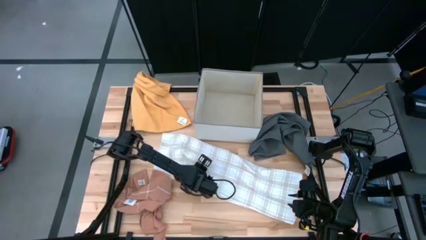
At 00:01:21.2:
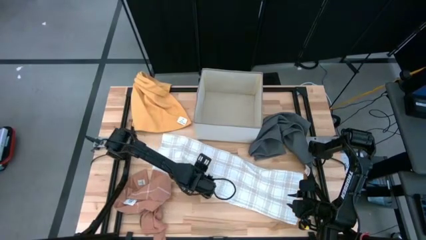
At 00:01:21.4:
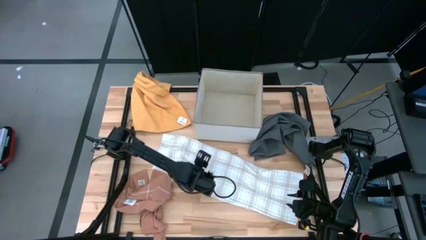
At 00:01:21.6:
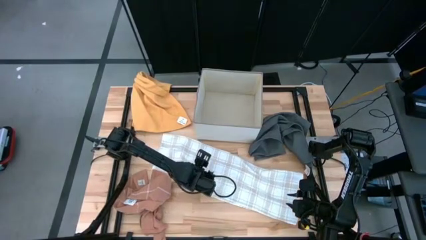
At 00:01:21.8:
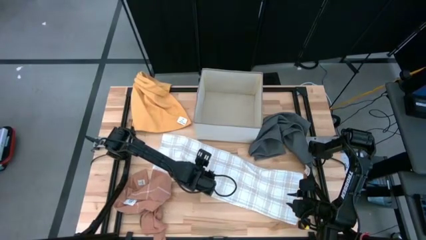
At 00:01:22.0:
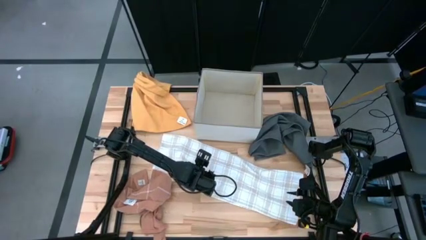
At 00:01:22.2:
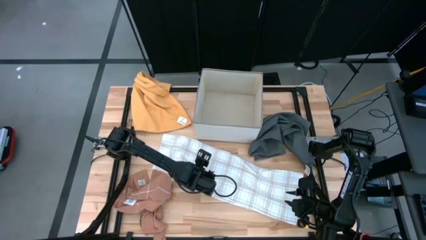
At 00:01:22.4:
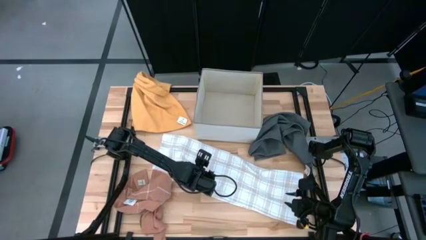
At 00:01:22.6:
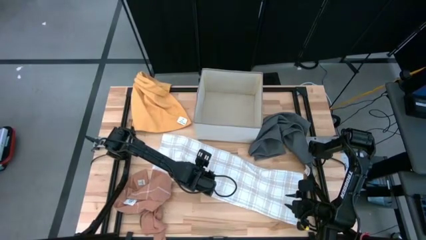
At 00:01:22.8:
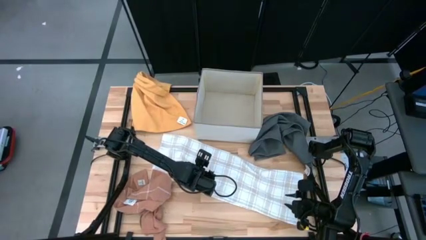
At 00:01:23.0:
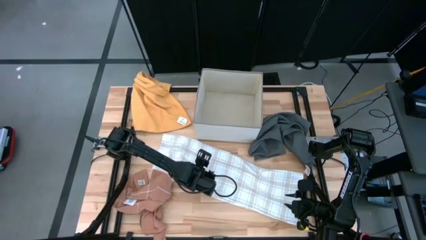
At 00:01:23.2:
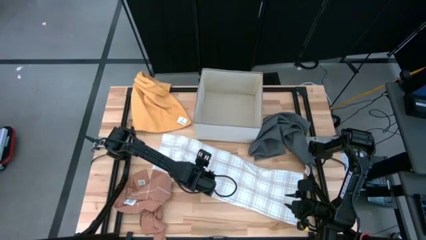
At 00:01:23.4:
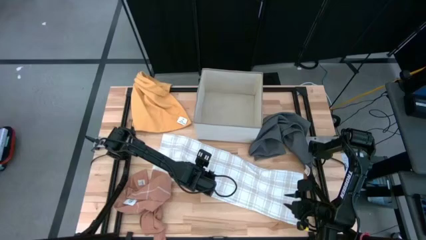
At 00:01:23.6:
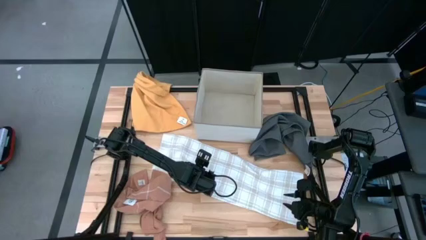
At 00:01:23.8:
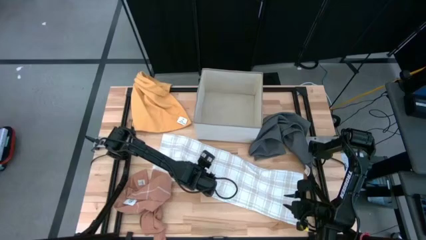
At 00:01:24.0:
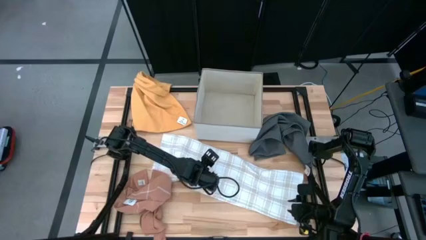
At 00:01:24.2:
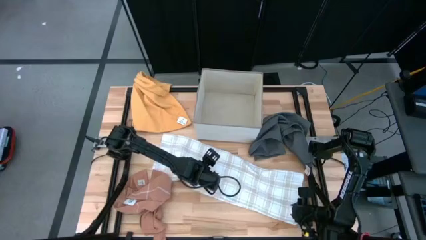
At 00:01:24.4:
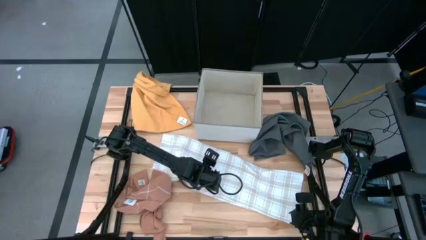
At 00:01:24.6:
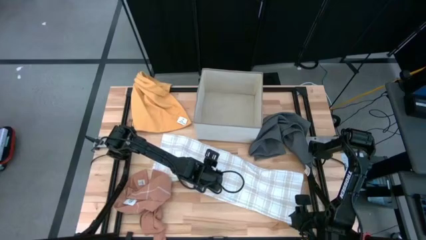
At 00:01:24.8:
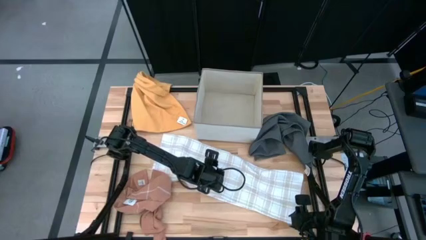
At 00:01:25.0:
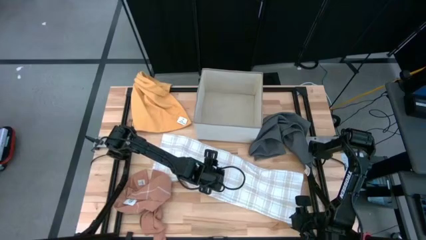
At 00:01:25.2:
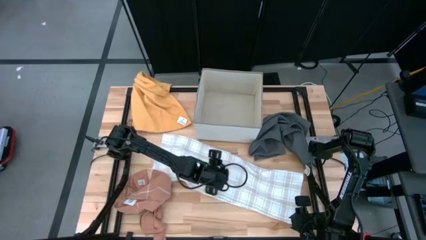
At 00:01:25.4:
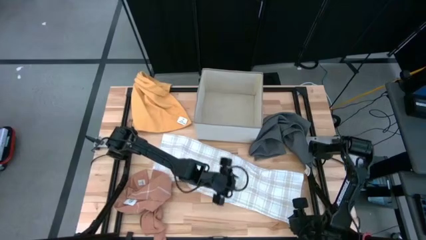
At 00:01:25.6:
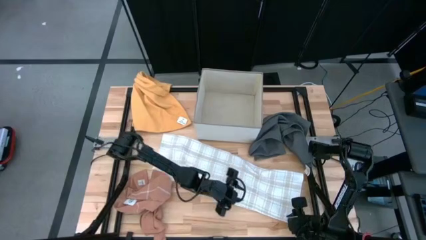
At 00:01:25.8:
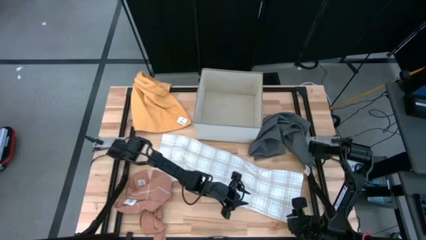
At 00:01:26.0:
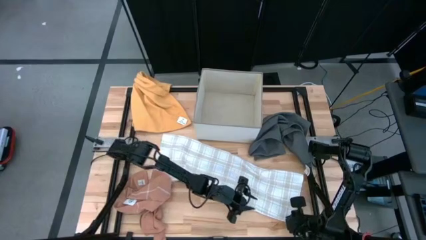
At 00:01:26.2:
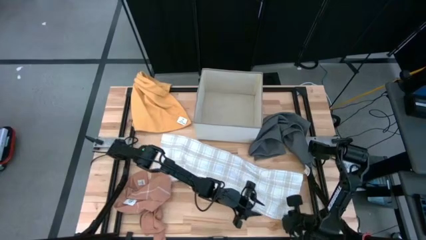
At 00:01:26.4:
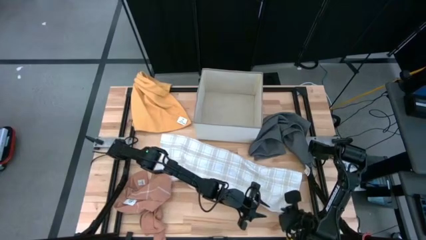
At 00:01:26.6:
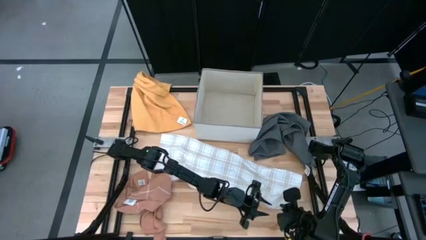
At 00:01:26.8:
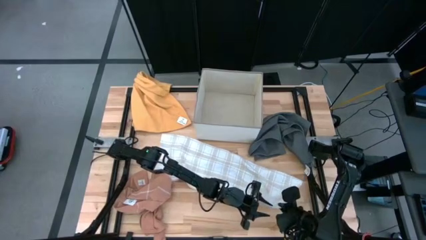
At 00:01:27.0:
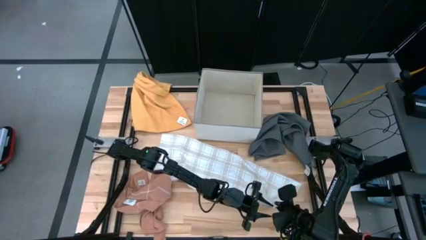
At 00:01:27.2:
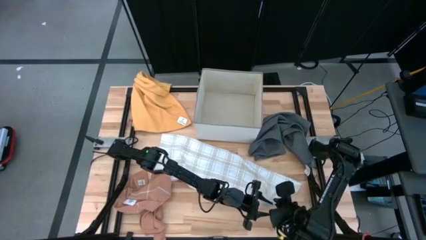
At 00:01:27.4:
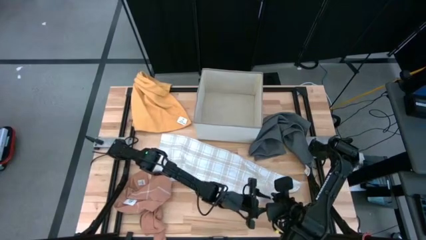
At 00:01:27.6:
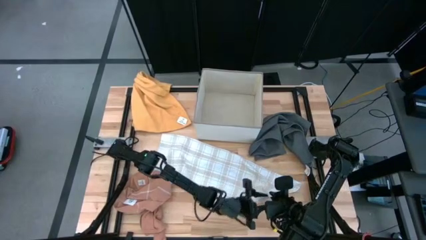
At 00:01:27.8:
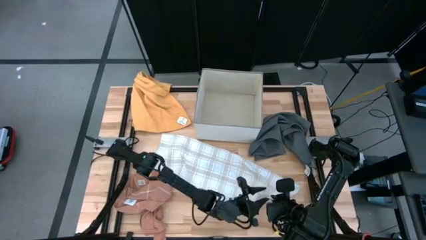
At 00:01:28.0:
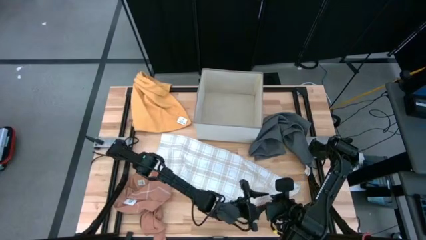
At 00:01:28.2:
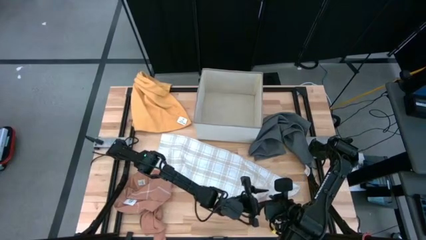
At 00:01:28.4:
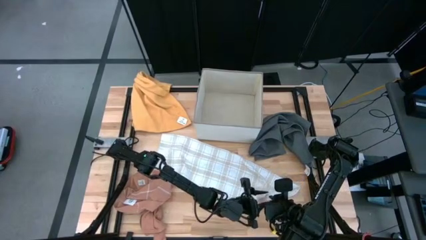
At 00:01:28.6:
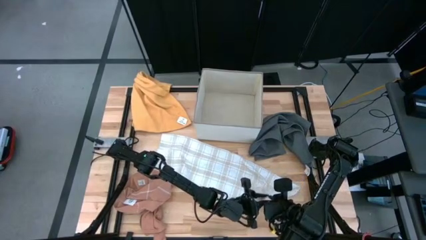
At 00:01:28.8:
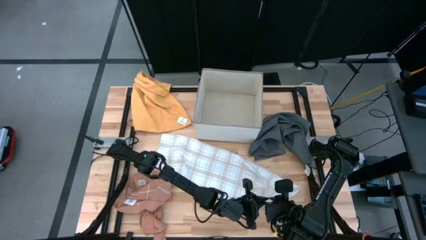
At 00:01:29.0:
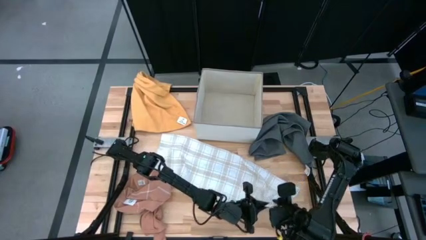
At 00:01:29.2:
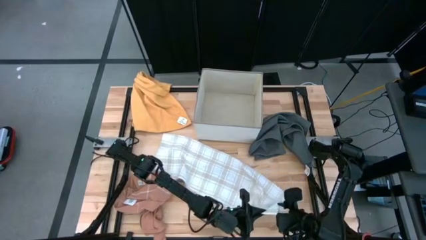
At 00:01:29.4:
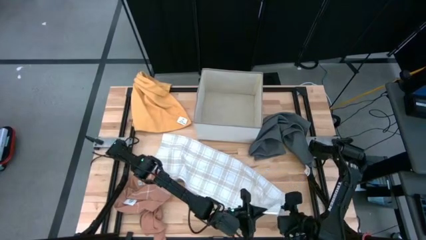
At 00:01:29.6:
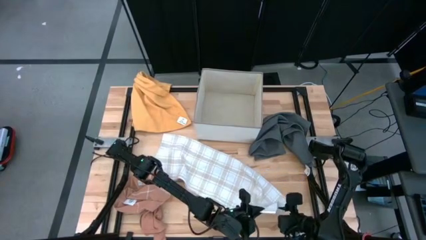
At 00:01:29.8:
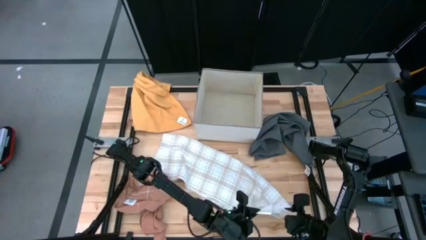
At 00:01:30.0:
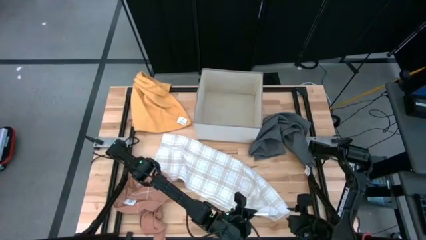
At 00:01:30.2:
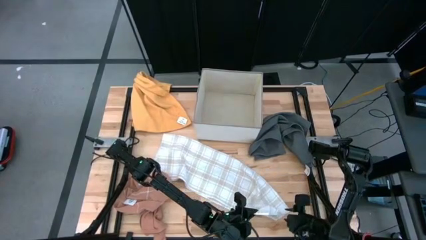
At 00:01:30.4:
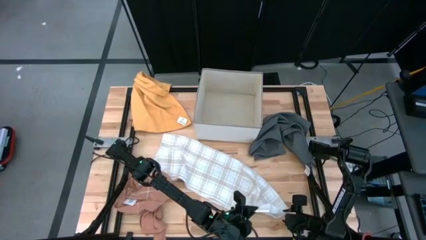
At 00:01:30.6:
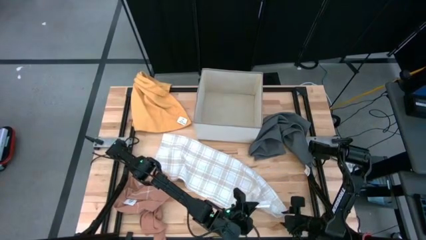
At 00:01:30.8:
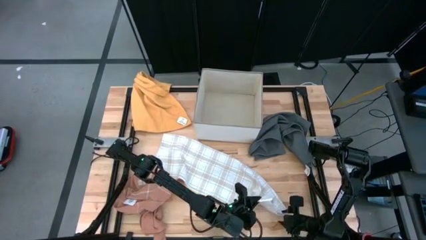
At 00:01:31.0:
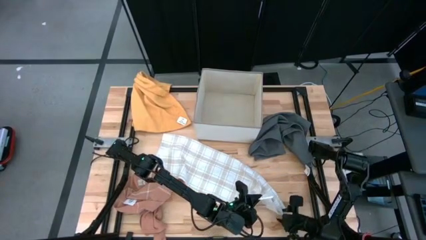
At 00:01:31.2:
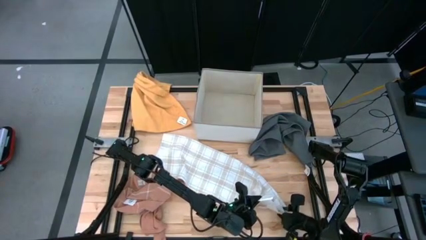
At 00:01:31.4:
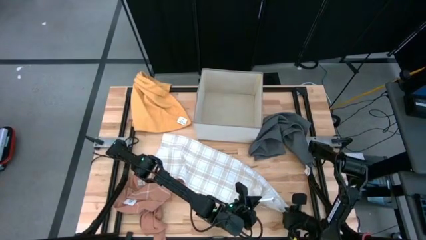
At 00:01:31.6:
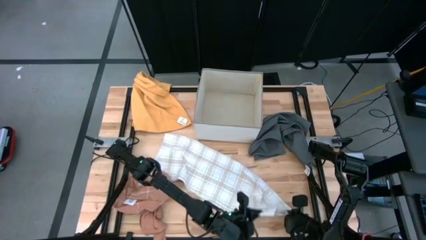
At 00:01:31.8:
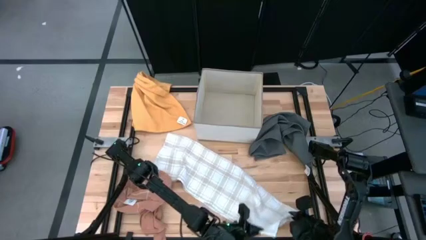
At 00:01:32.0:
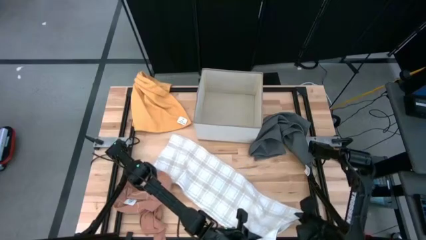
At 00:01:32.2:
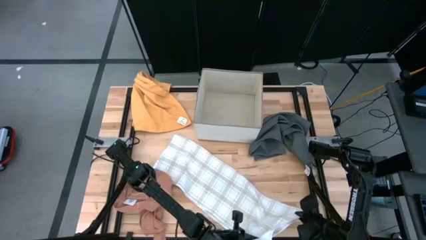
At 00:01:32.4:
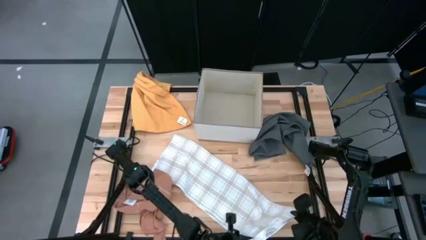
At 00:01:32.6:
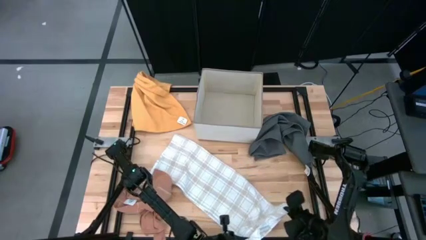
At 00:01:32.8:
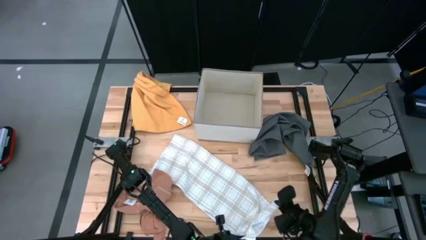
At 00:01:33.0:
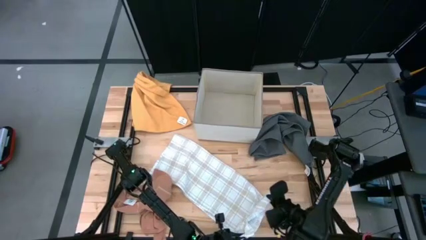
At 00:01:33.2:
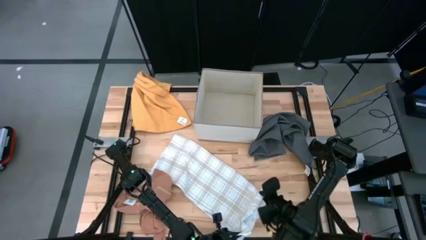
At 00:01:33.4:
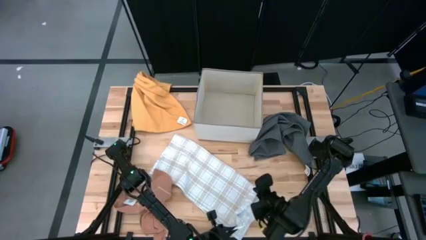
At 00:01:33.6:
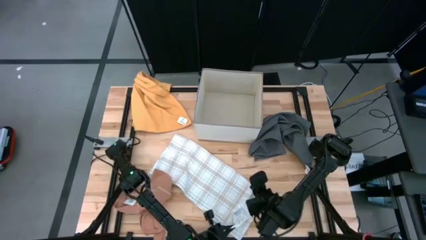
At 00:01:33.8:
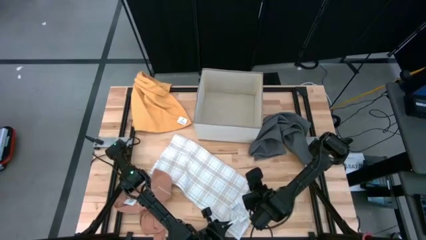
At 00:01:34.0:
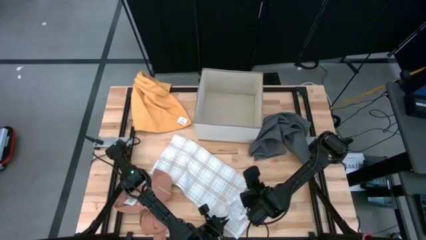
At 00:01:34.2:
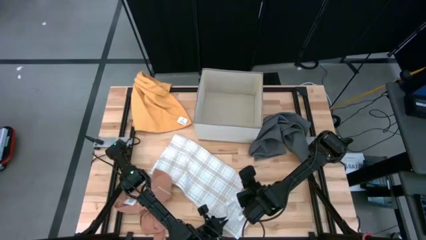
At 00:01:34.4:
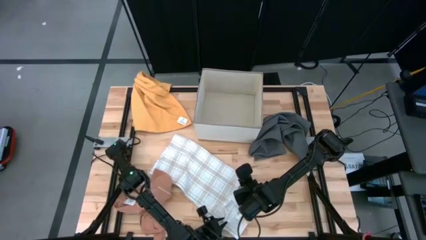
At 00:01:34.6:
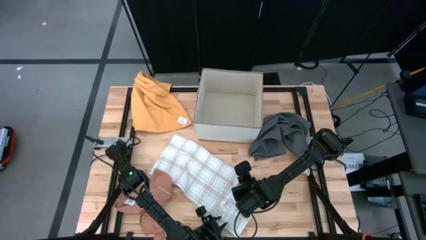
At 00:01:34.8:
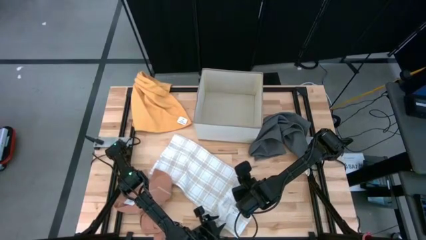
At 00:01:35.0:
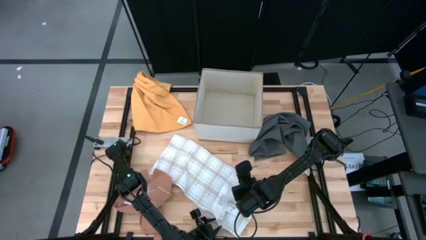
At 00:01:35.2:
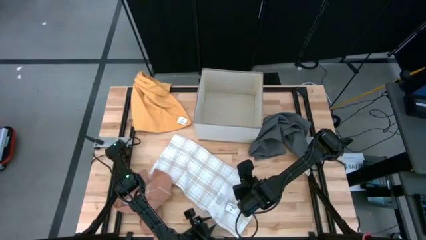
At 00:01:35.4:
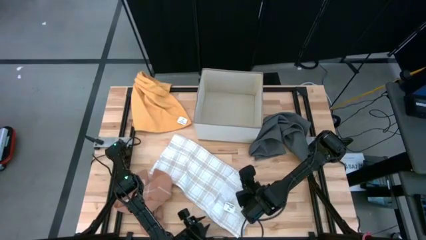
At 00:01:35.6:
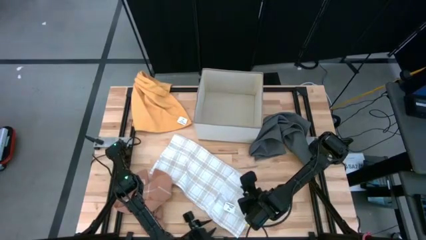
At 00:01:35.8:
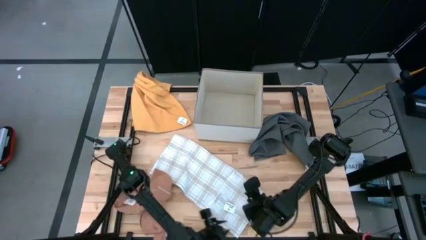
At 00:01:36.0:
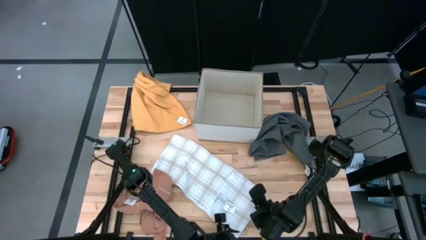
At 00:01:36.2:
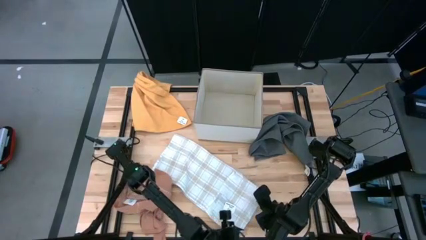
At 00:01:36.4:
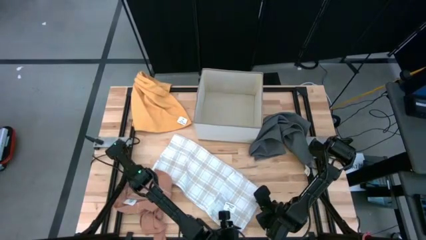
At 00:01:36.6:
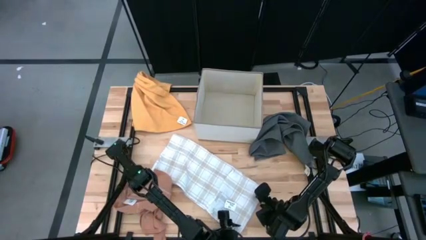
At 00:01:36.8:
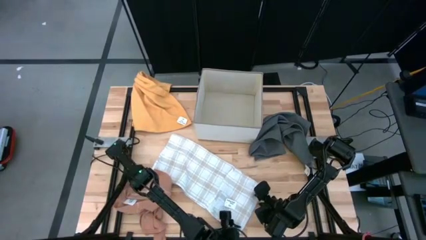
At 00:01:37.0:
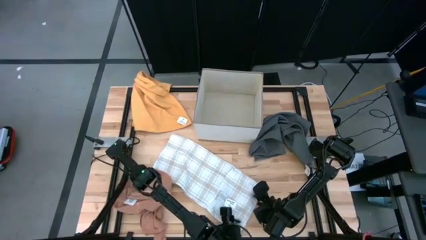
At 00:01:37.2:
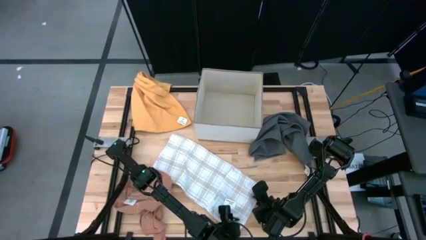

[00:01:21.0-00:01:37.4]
Task: Fold towel
Fold the white towel

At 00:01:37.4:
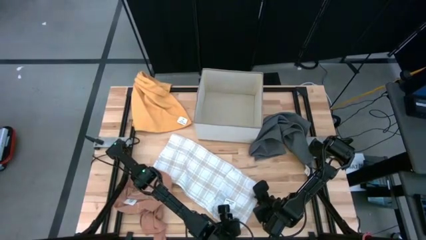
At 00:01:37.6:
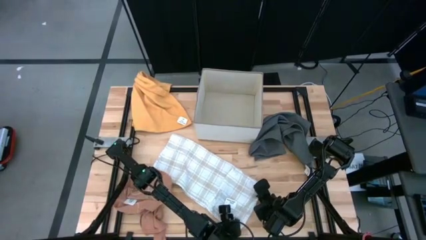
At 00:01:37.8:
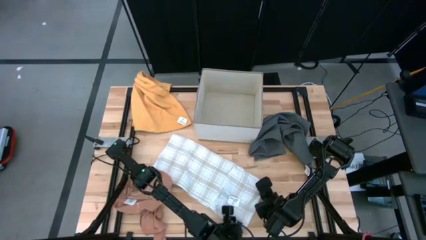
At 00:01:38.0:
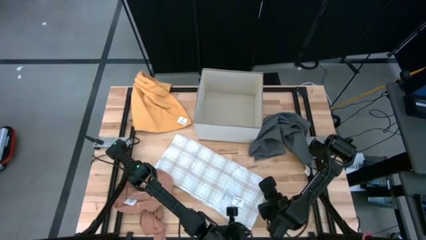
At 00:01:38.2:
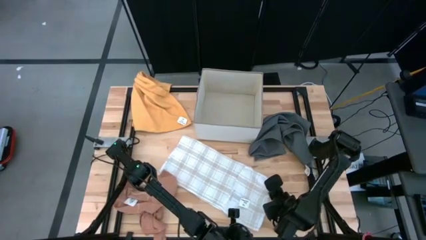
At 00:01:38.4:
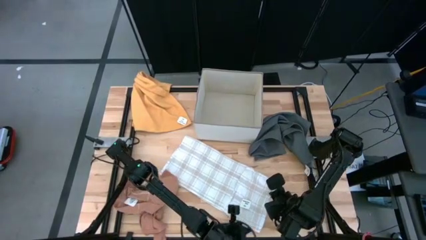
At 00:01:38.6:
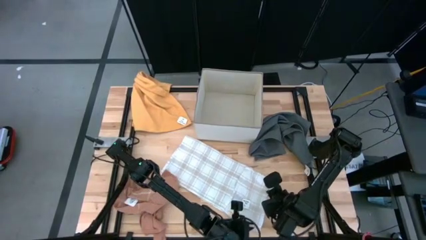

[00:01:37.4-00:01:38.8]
Fold the white towel
